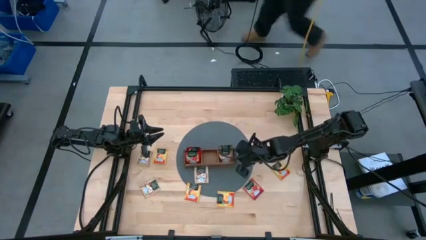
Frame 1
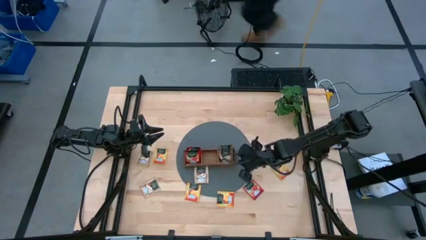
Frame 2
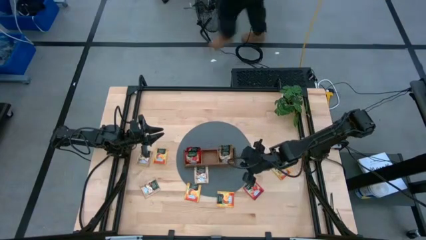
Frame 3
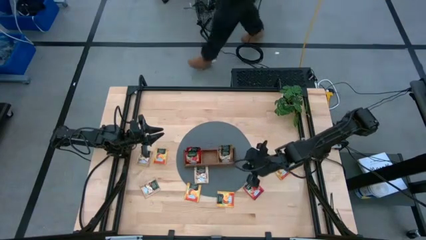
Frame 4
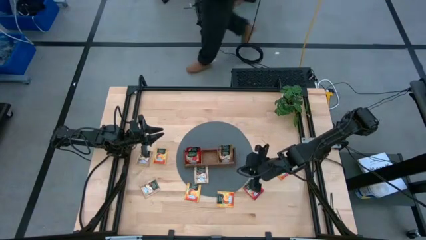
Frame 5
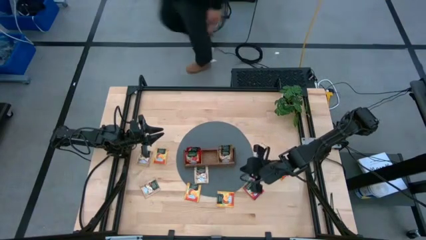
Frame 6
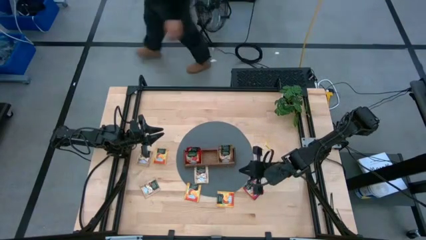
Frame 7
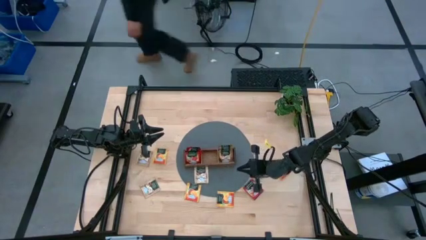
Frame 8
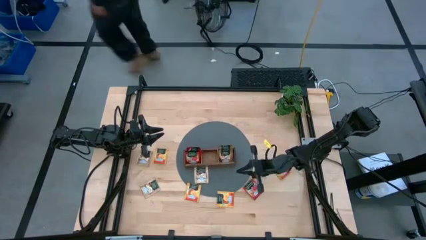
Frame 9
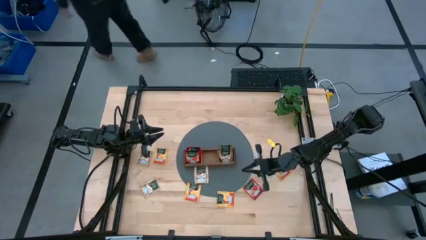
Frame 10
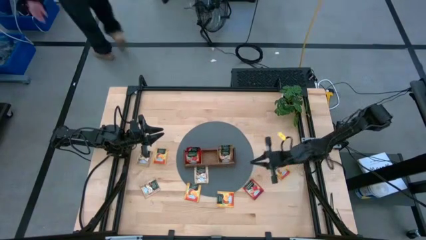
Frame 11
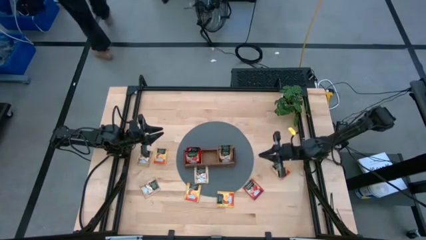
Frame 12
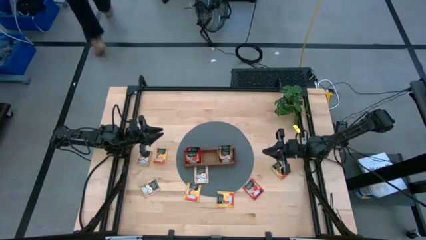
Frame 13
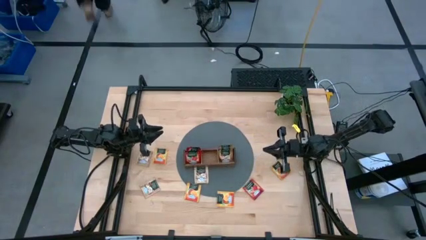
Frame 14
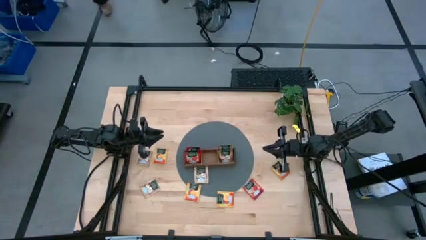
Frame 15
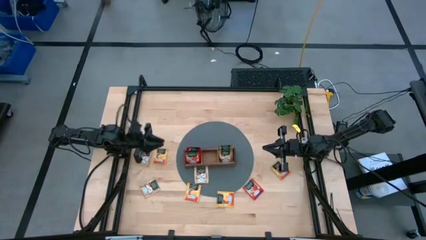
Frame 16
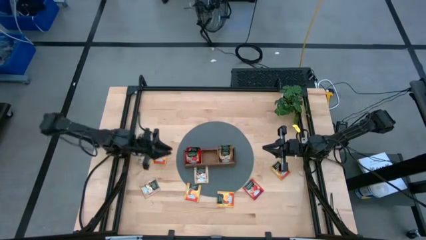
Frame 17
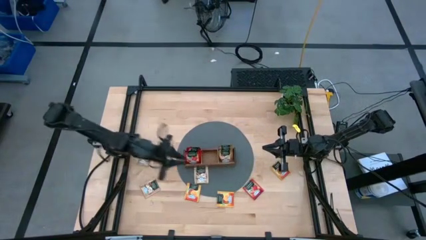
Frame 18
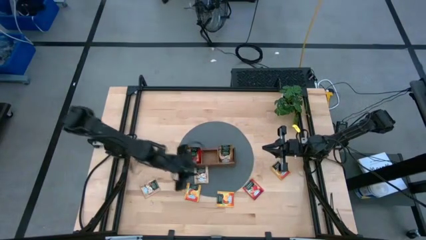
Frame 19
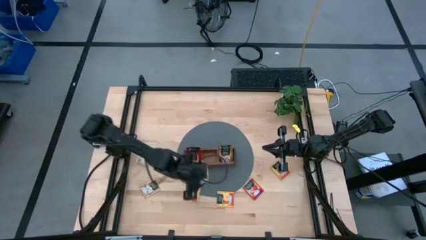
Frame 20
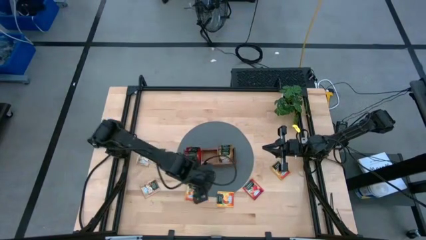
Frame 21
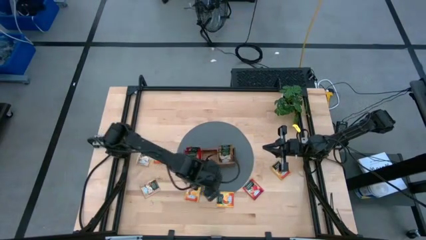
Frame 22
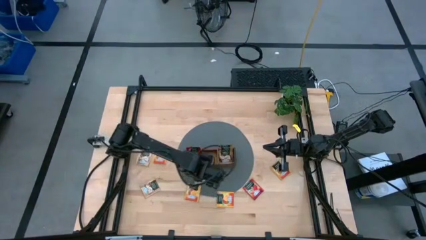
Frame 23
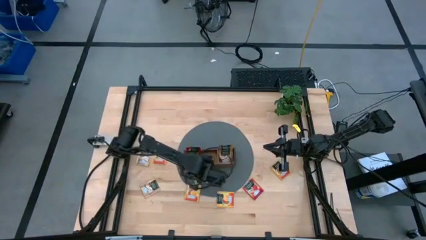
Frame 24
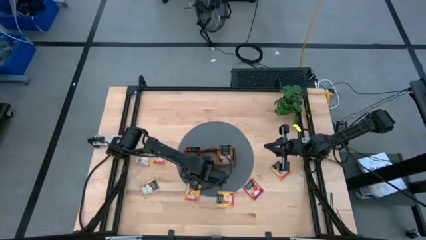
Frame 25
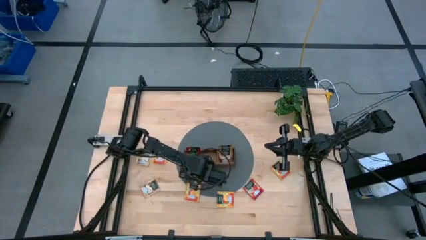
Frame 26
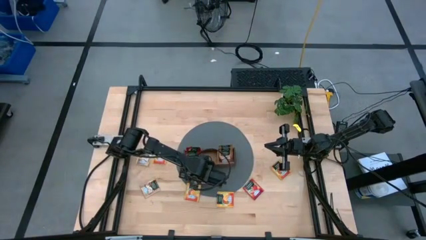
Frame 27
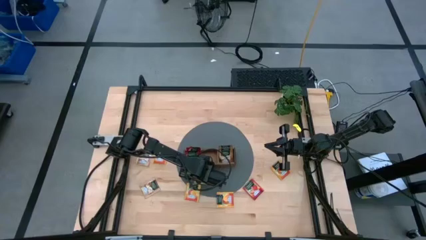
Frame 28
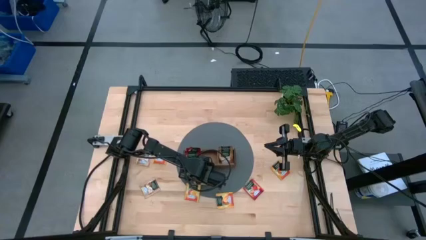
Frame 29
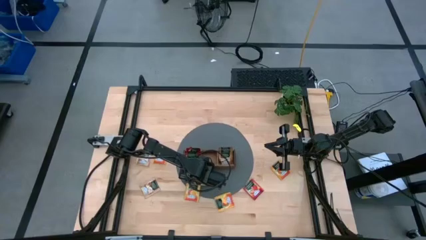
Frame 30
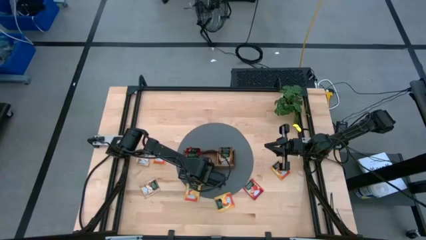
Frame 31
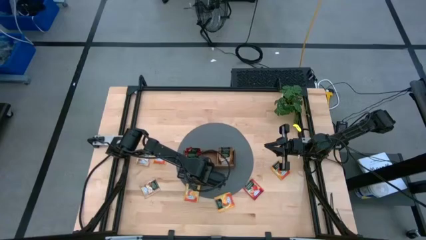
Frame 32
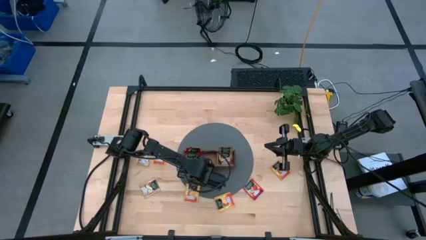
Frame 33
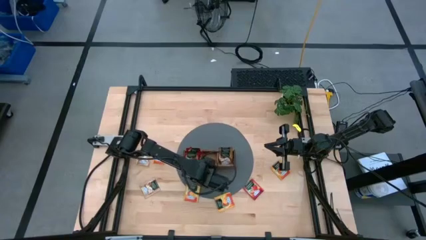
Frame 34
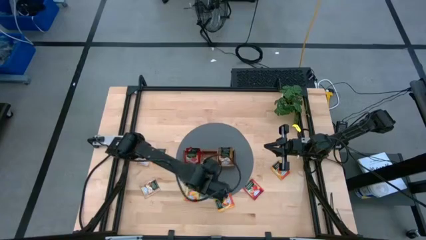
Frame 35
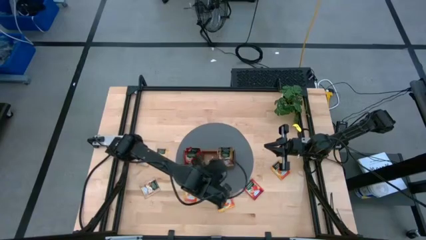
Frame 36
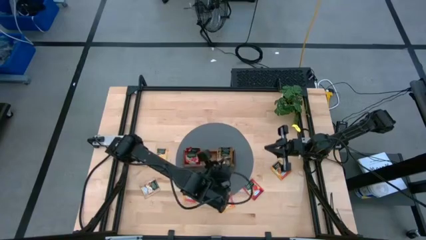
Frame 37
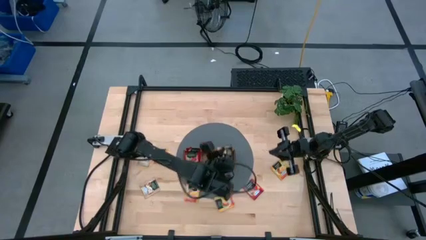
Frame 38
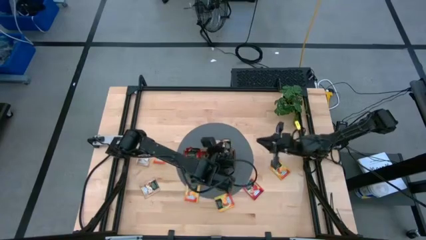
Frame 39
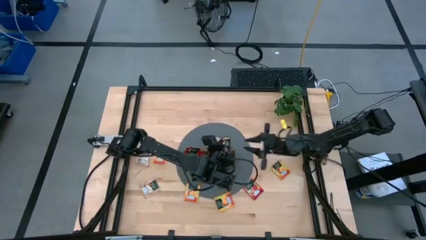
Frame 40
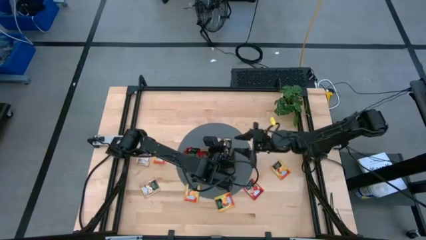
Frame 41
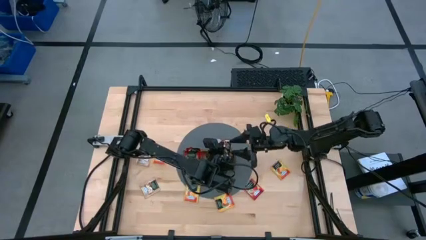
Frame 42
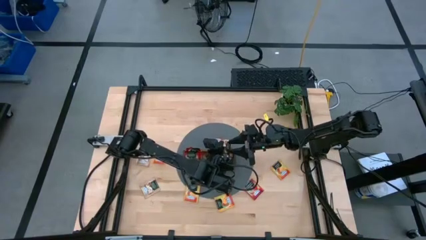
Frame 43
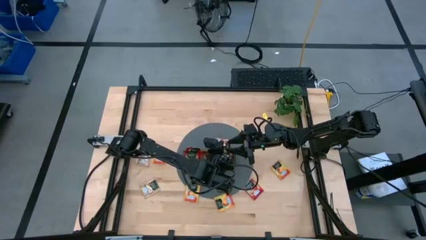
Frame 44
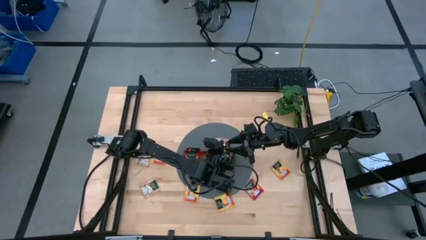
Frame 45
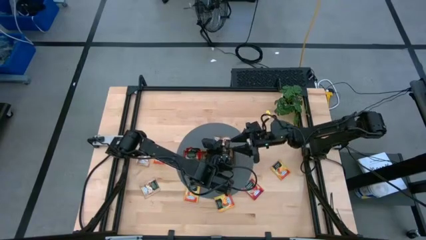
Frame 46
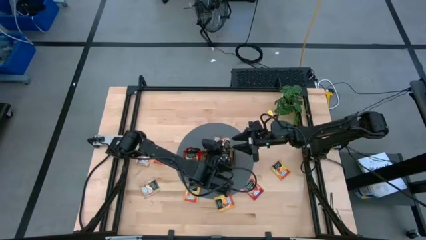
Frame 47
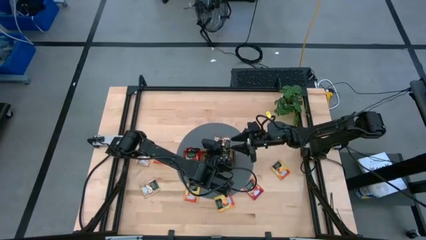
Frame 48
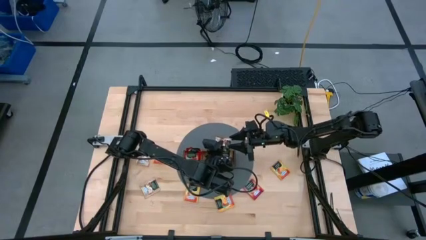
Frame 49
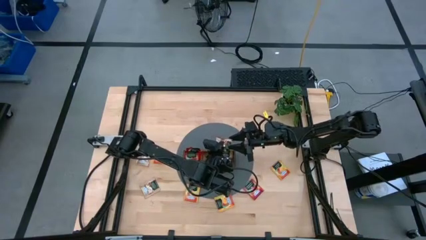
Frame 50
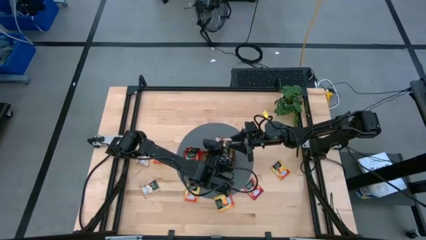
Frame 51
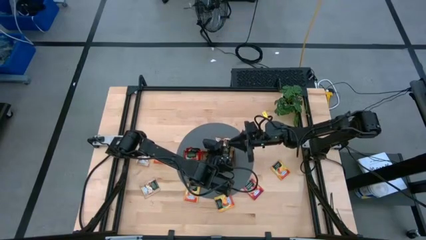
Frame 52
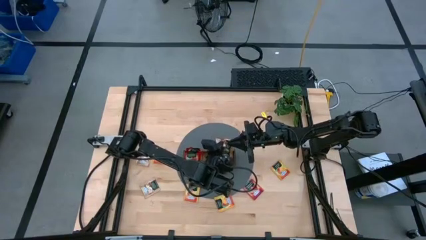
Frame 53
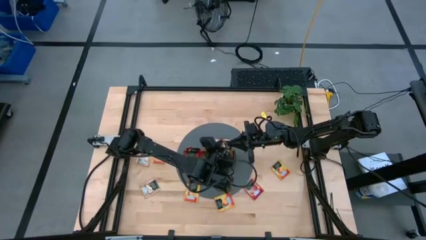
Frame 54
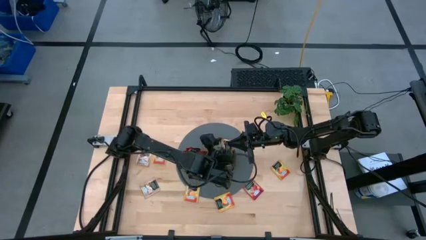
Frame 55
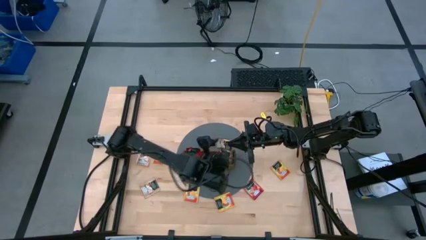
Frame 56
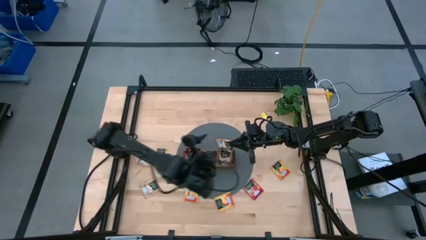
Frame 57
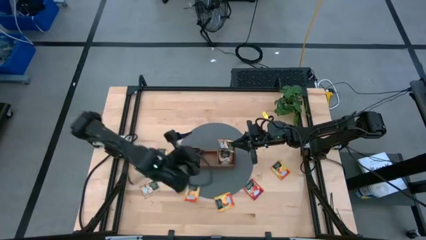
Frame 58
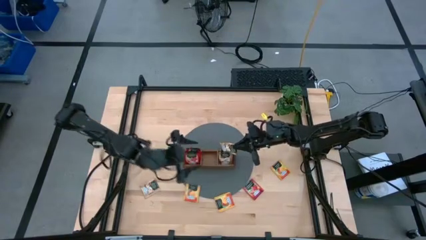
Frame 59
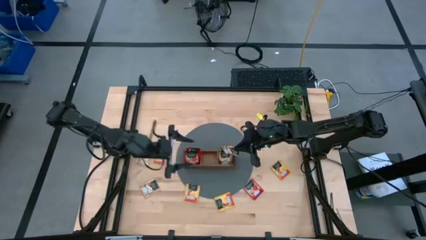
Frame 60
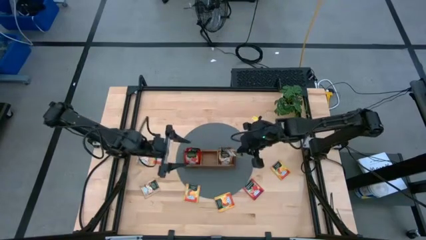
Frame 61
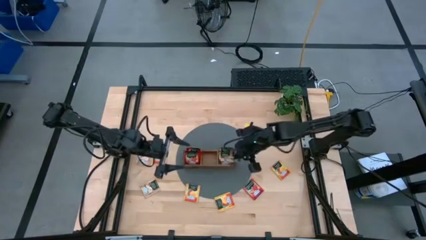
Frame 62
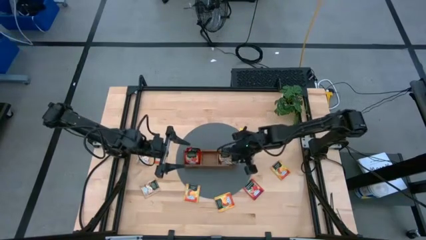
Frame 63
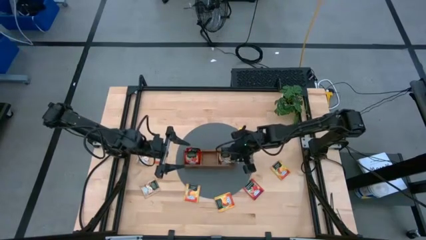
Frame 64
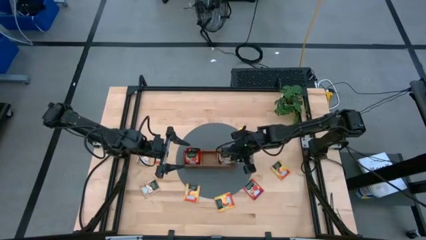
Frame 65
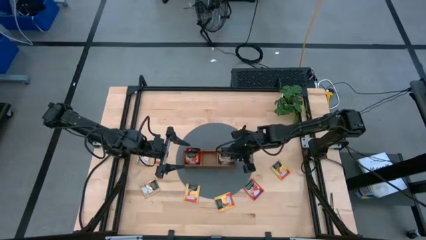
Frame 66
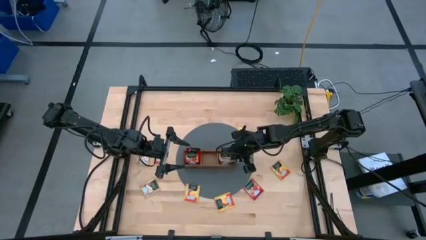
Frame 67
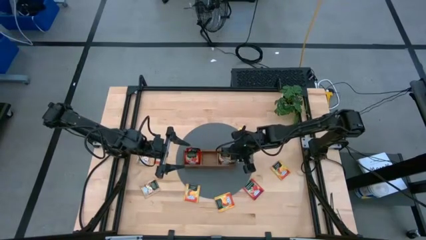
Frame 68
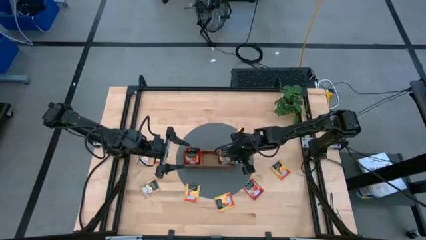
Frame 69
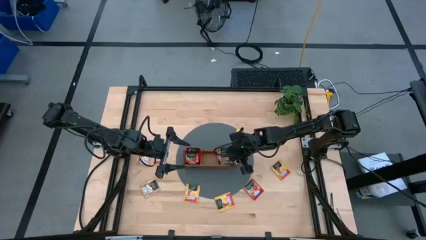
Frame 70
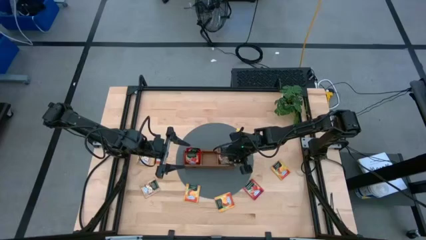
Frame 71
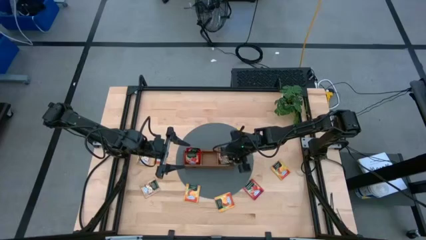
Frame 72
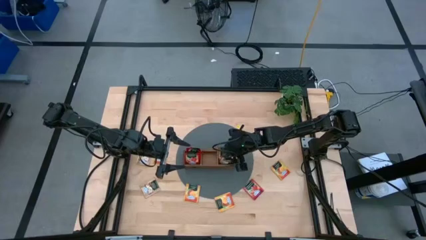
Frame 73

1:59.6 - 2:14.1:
Task: Pick & Place Tea
Put the yellow tea bag into the right section of the wooden organizer

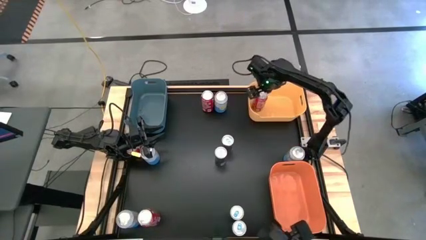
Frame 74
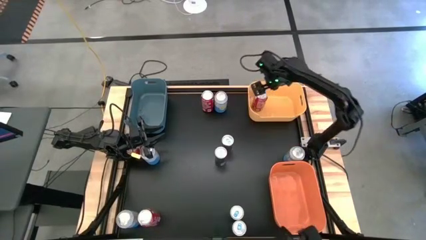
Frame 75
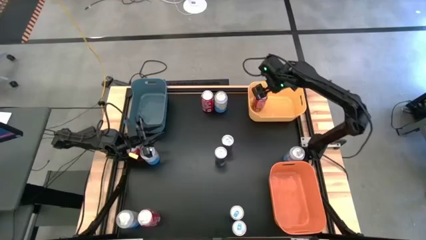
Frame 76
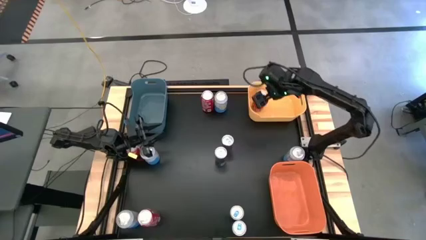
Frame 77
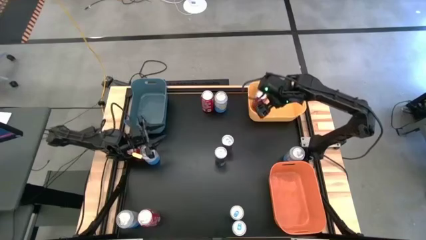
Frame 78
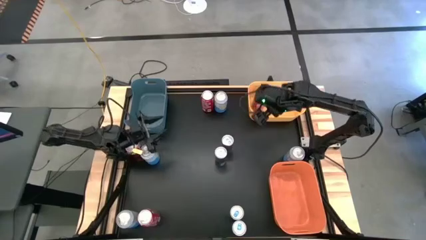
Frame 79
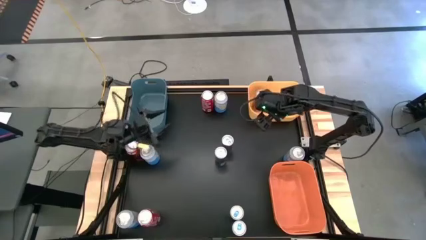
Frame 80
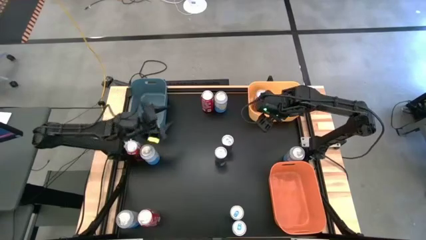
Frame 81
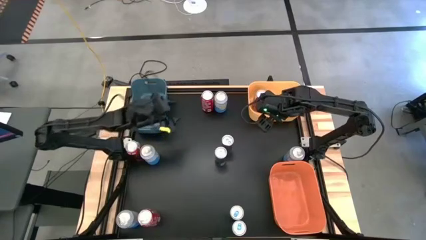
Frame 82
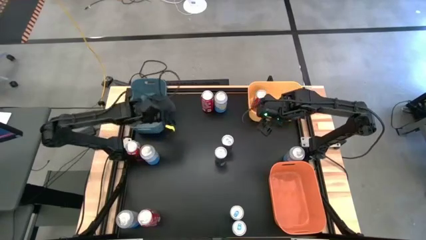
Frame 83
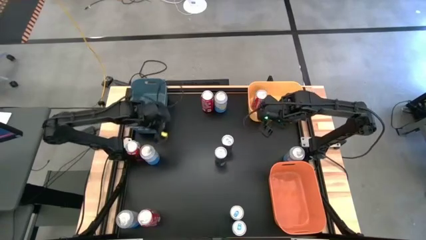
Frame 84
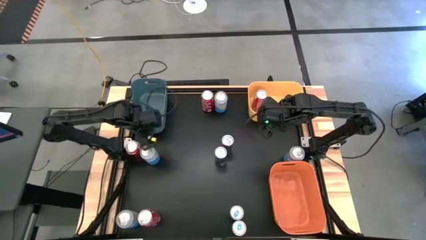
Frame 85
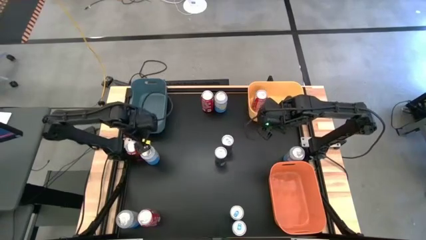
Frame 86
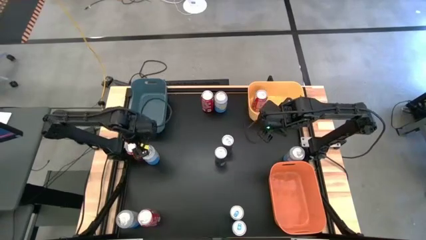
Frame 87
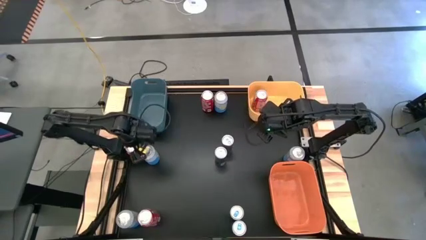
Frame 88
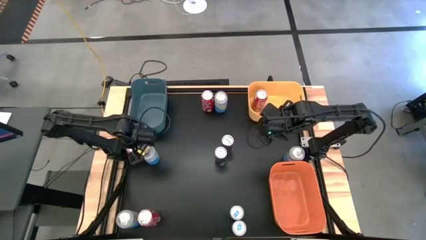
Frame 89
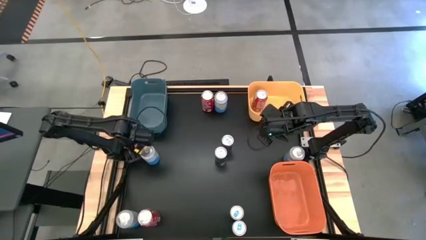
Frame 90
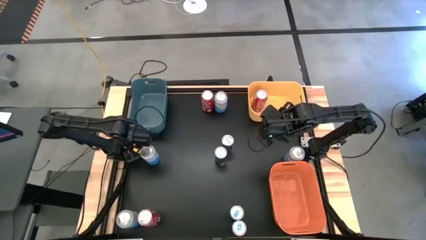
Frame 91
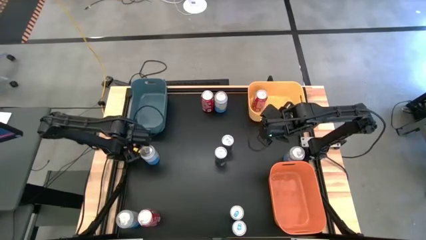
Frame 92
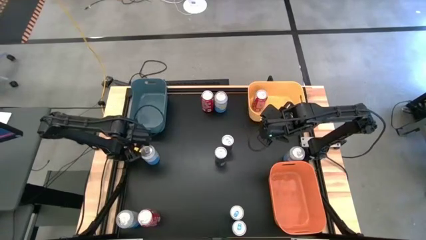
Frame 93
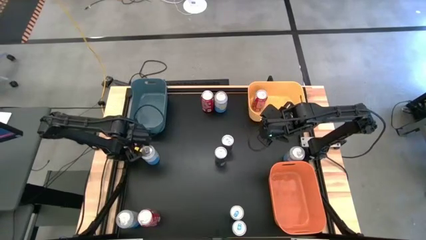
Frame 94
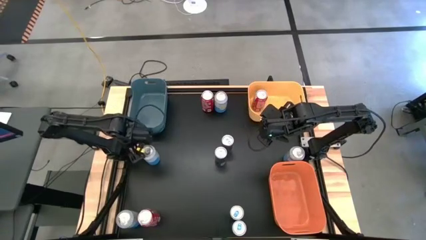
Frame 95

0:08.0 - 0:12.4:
Task: Sort soda cans
Put the middle left red soda can into the yellow bin
